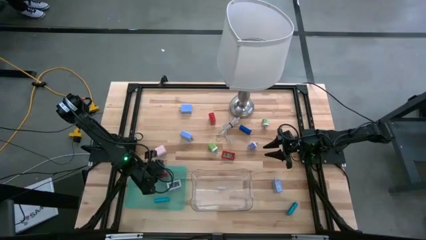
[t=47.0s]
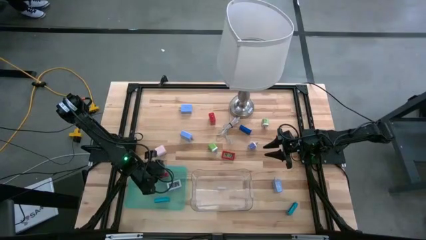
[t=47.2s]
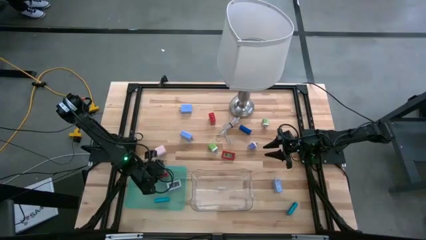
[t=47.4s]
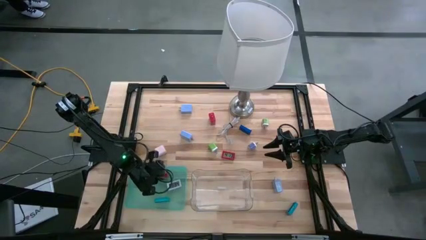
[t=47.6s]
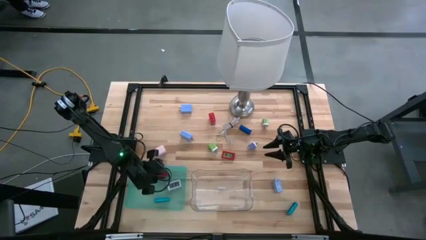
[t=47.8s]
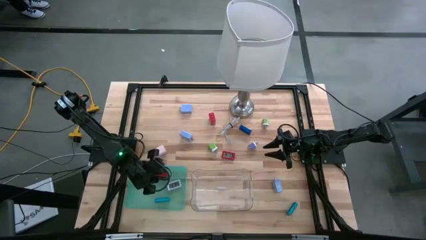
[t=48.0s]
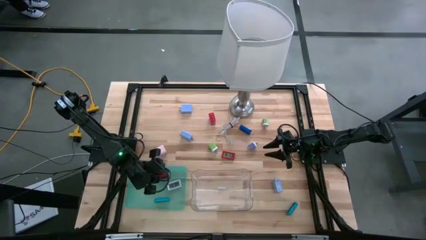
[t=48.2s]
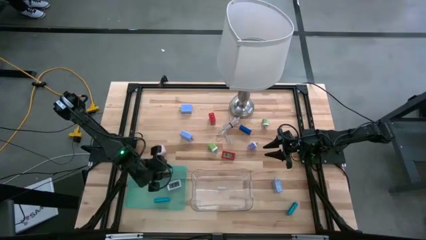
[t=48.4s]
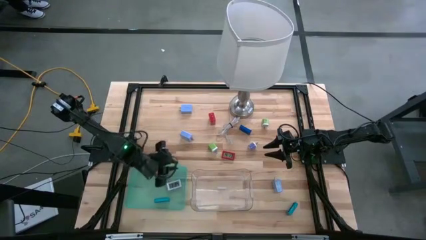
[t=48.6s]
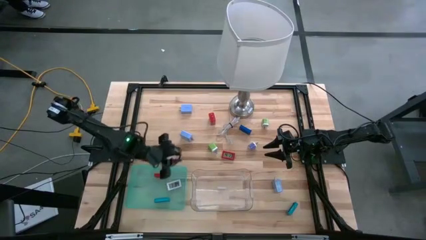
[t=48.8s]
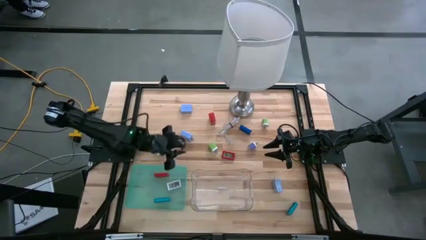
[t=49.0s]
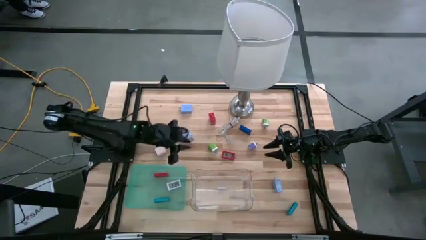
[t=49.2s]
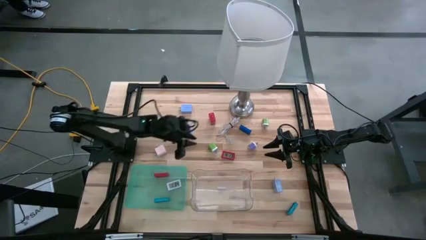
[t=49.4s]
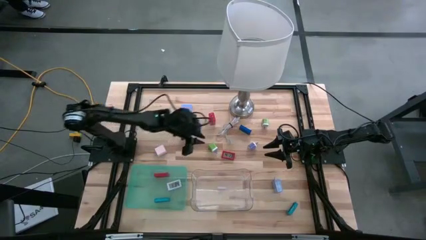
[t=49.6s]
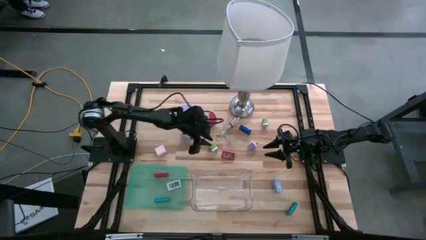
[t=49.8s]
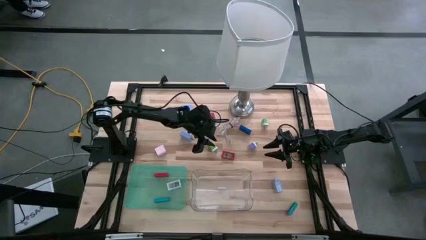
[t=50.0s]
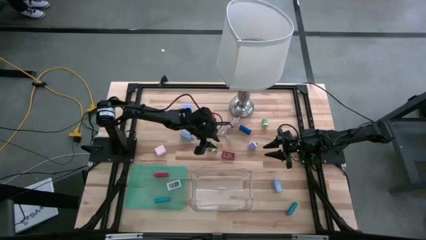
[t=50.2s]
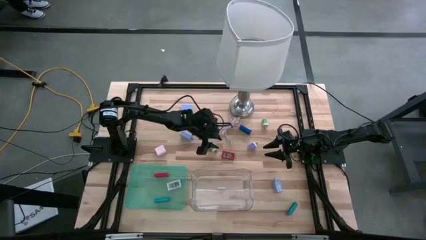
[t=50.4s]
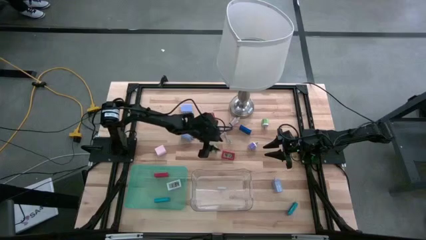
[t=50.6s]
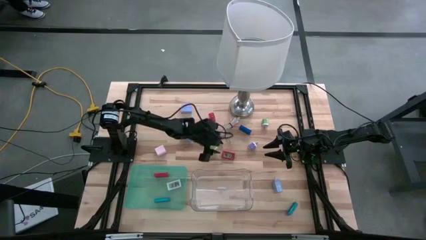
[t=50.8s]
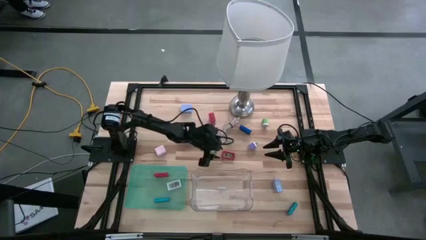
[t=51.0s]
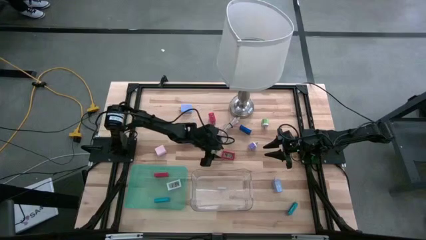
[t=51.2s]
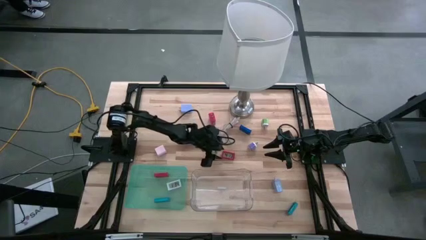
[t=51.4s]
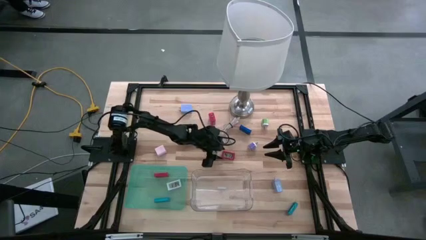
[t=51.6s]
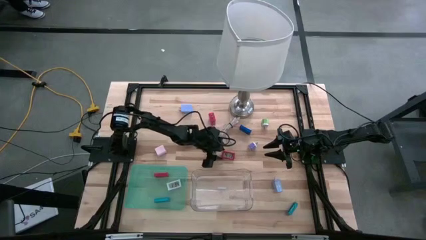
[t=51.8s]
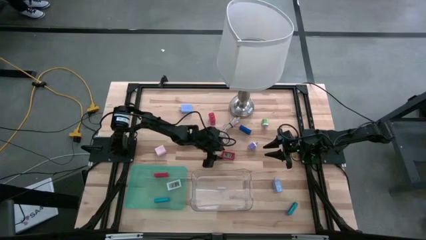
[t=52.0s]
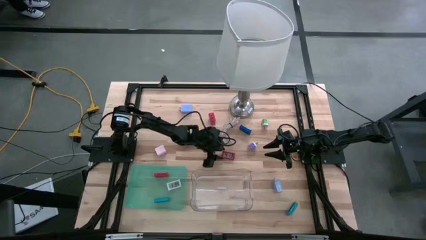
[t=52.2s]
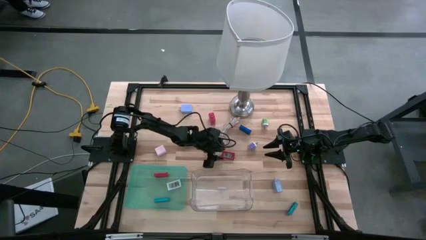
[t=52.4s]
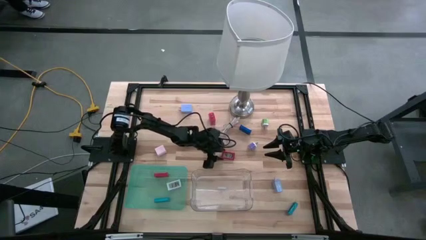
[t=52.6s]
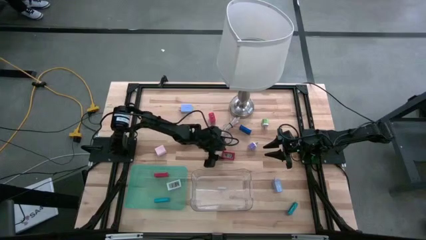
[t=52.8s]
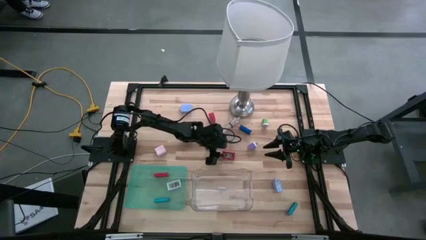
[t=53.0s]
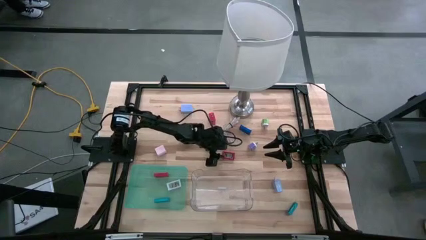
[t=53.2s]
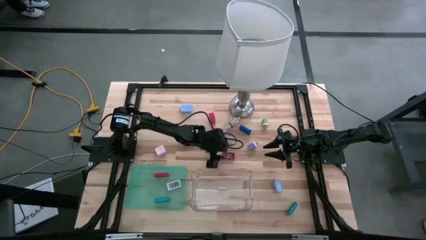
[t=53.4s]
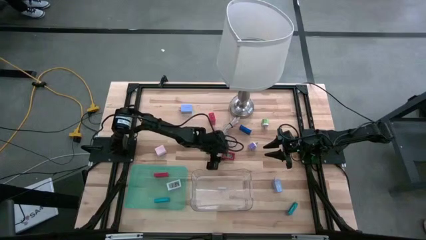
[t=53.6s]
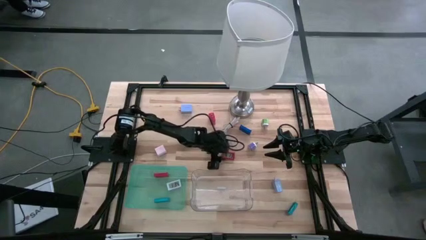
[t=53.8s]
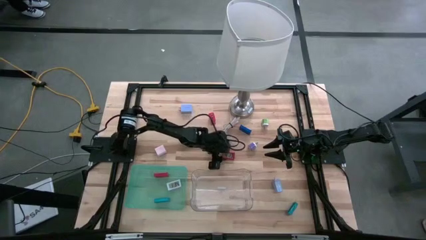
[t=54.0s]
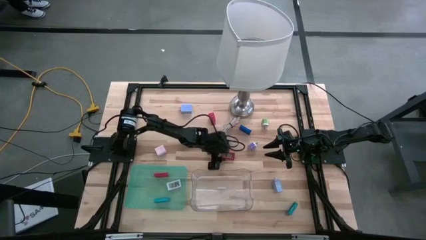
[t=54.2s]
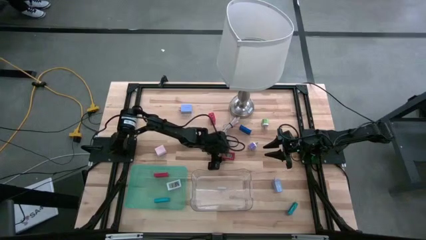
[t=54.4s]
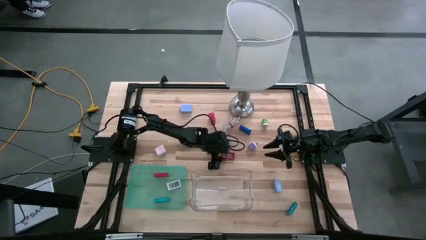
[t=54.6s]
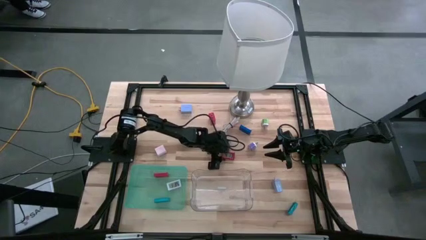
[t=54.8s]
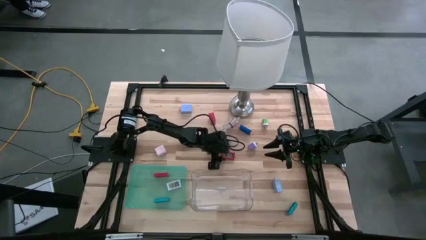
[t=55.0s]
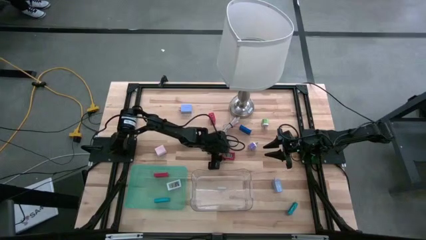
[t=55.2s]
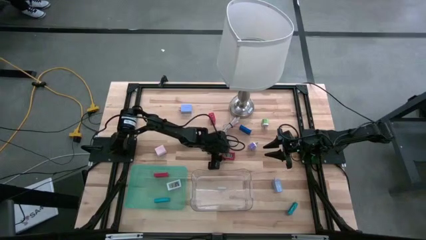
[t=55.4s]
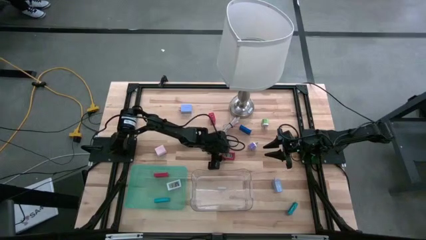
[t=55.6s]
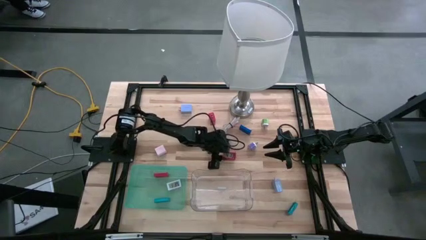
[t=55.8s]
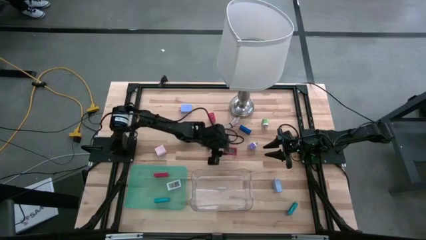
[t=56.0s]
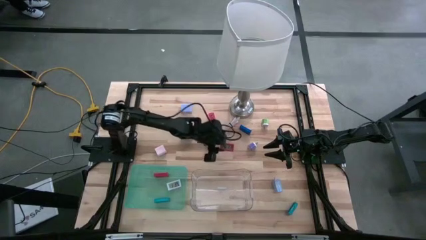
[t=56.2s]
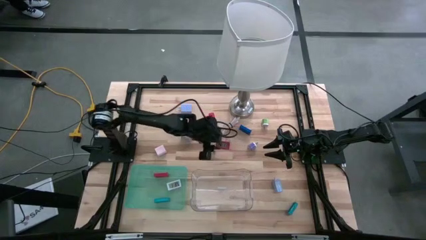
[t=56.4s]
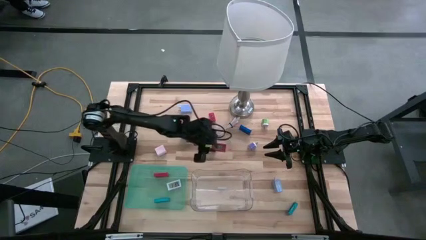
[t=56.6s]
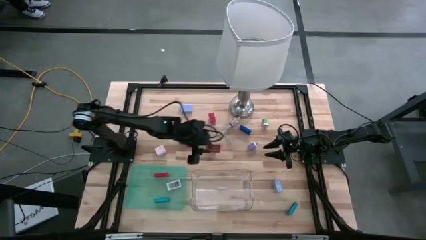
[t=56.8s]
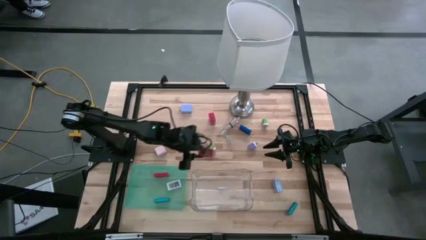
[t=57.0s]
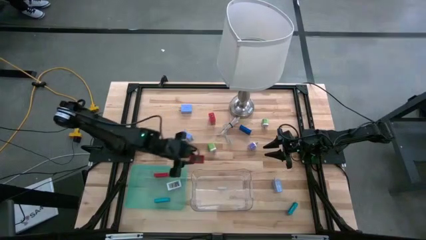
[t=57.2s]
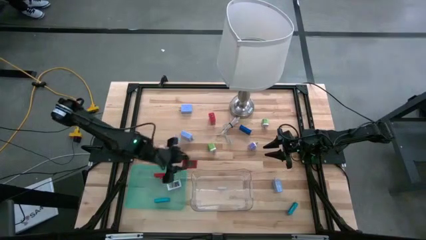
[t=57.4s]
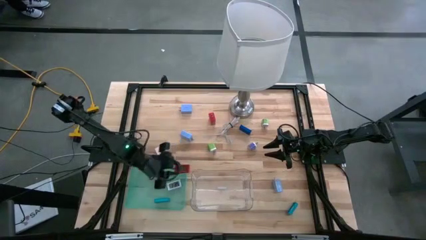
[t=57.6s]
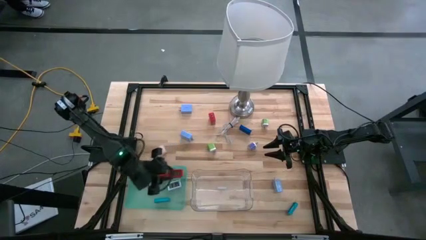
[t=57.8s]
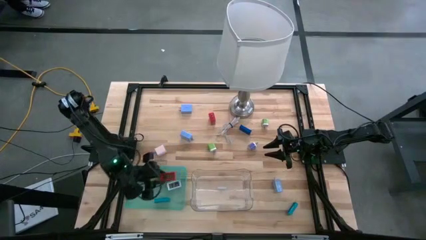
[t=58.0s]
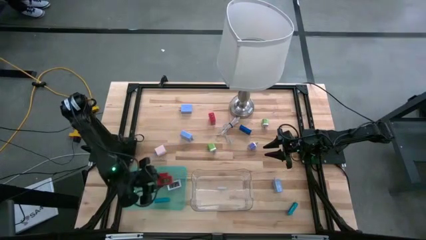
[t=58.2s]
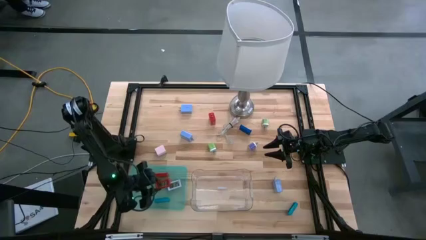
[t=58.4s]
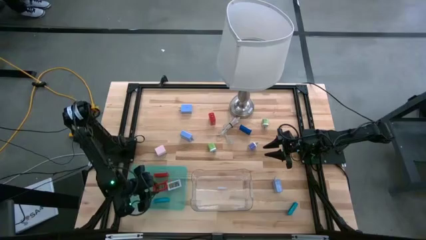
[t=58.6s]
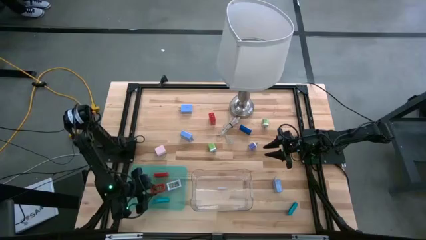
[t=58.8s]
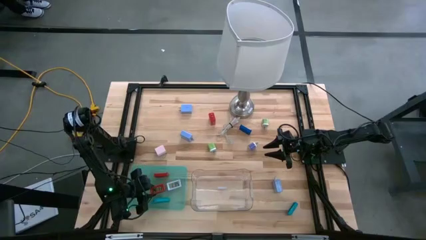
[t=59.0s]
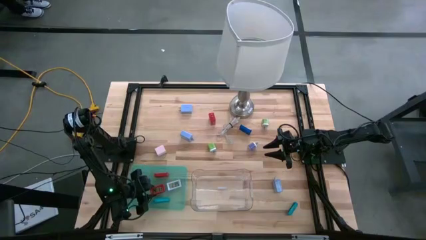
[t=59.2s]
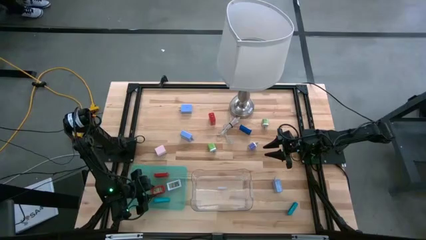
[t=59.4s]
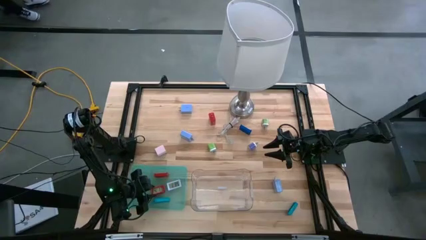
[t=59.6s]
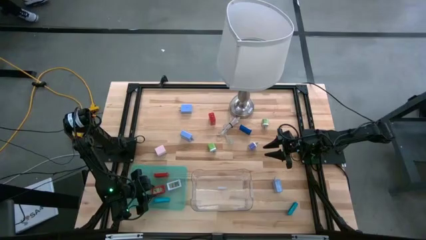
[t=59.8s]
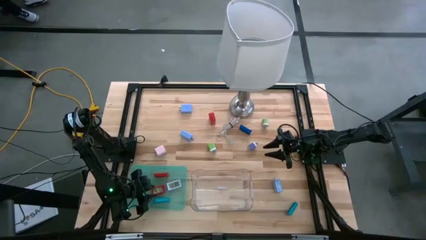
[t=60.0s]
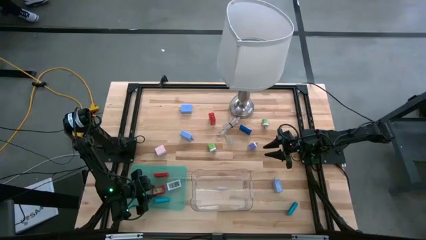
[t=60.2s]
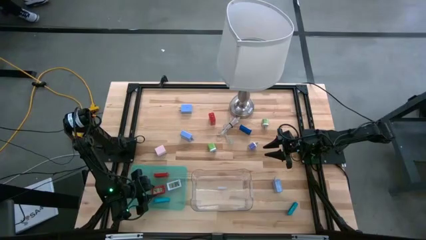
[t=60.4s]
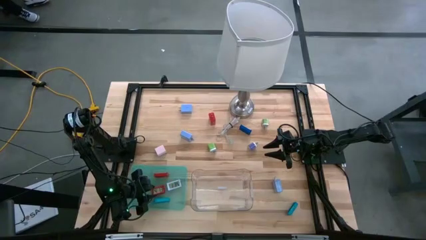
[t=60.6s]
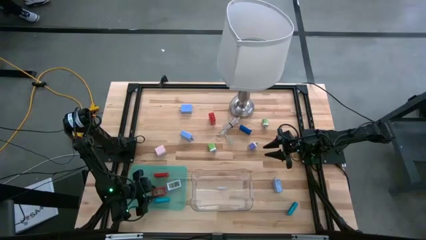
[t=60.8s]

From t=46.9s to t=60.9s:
Task: Pick & Place Office items
Put the red timer into the green bin

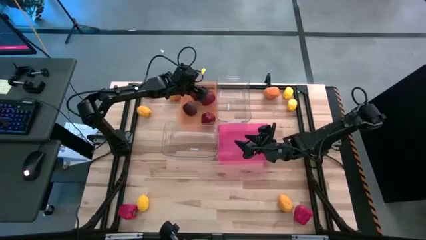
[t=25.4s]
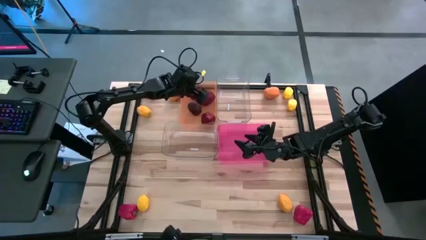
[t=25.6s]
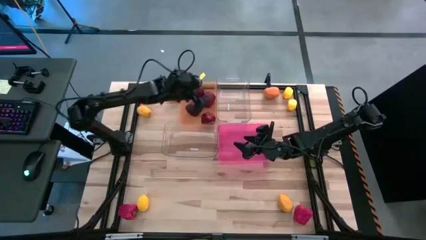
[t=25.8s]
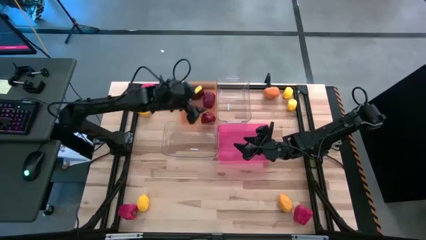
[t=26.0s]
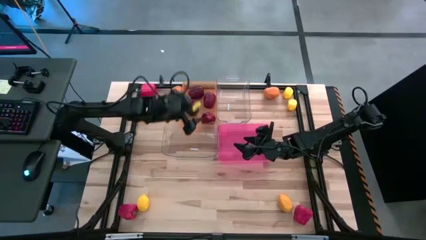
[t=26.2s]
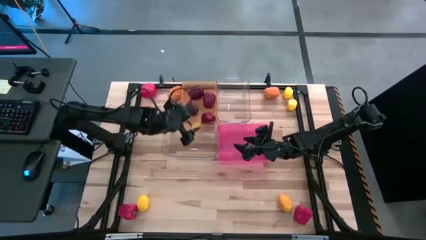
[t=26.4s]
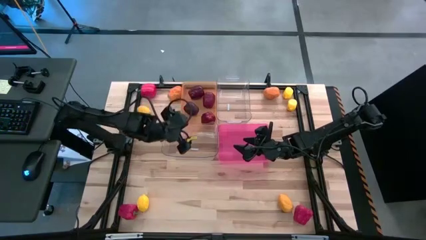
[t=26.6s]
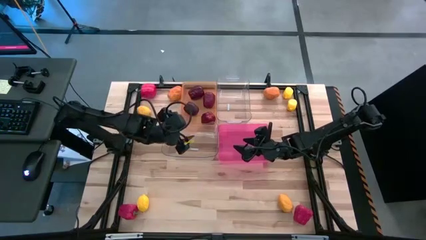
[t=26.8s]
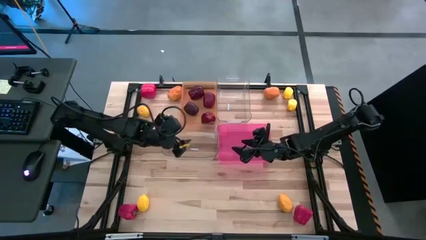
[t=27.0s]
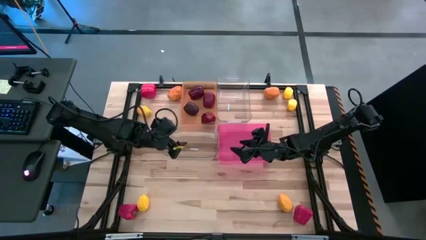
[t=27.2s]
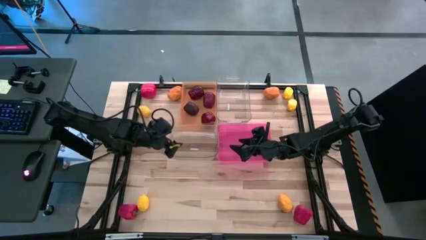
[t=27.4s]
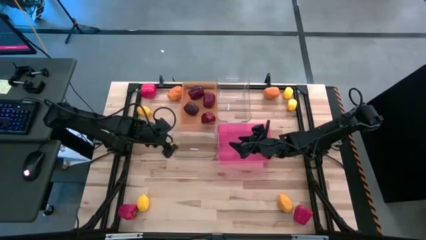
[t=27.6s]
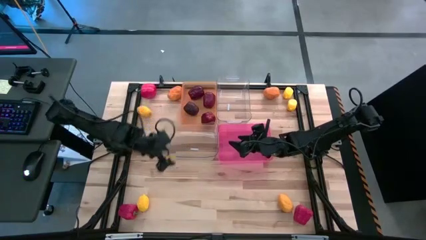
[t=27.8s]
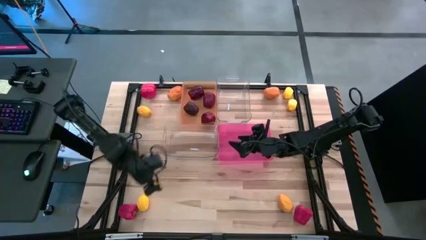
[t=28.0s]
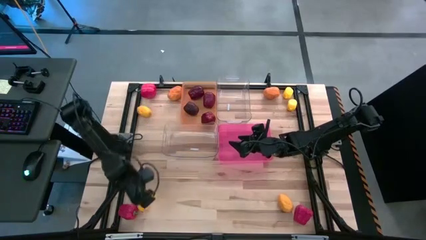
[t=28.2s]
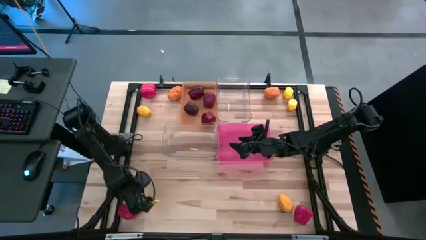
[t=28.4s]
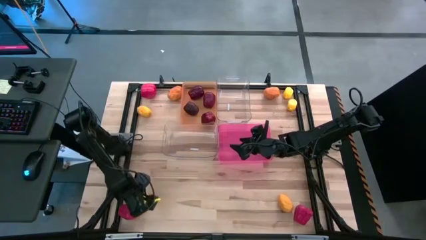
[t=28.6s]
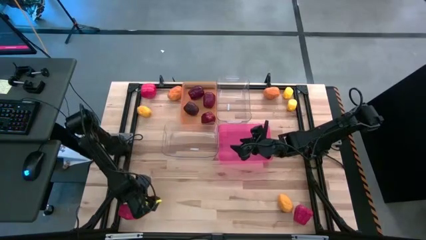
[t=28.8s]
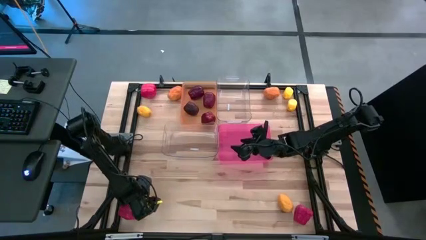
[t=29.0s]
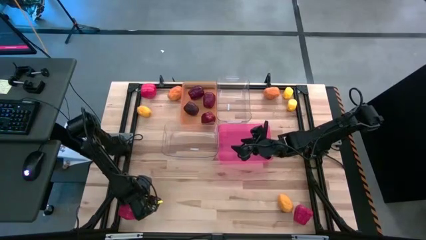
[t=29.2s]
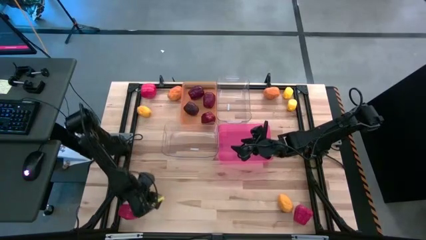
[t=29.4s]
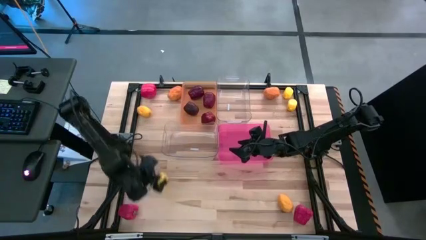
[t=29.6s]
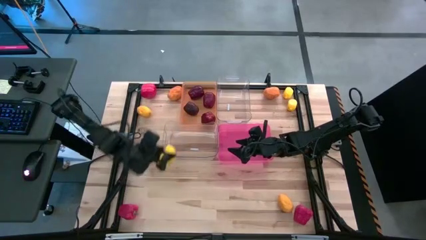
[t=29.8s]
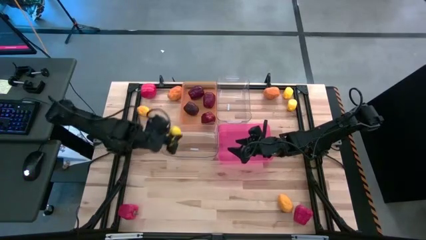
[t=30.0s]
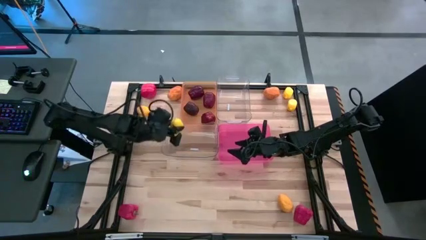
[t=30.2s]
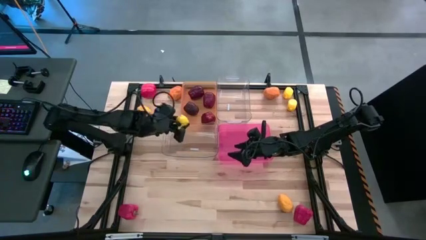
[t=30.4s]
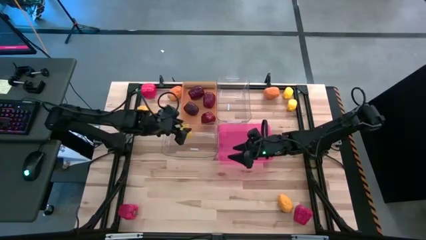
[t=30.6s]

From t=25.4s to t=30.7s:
Task: Sort produce into baskets
Put the yellow lemon into the bottom transparent bin
